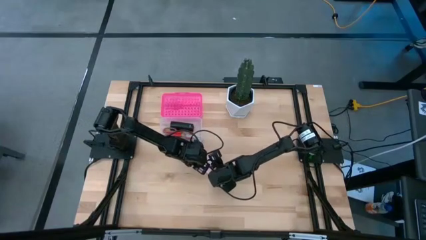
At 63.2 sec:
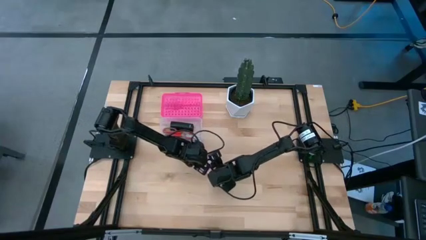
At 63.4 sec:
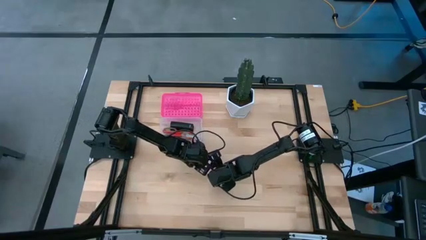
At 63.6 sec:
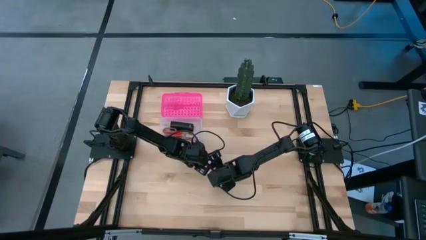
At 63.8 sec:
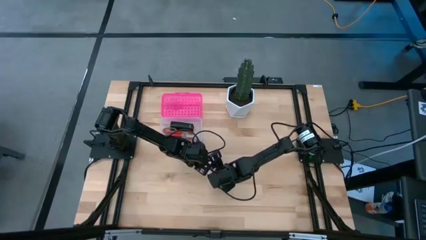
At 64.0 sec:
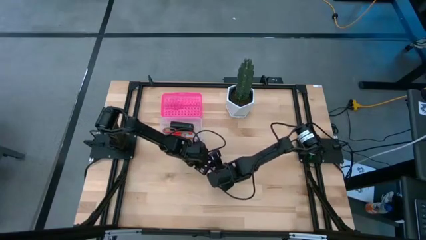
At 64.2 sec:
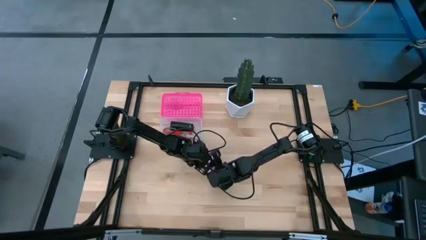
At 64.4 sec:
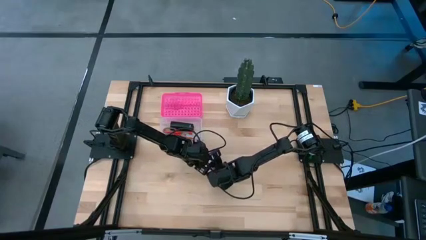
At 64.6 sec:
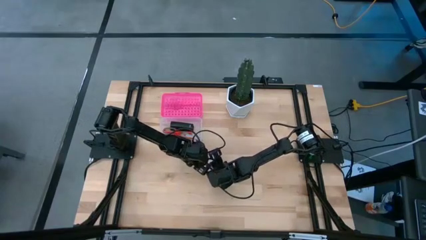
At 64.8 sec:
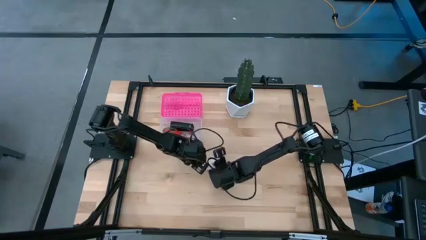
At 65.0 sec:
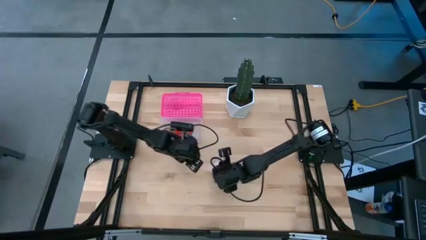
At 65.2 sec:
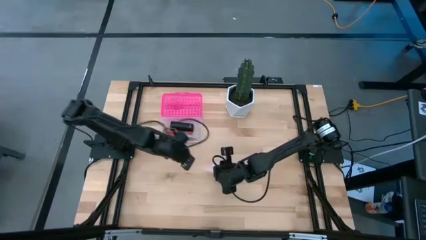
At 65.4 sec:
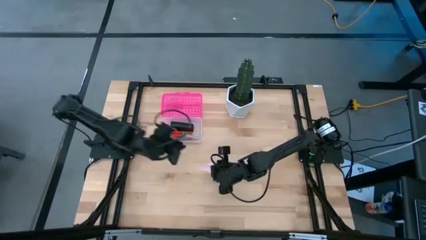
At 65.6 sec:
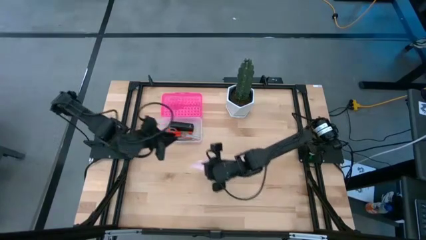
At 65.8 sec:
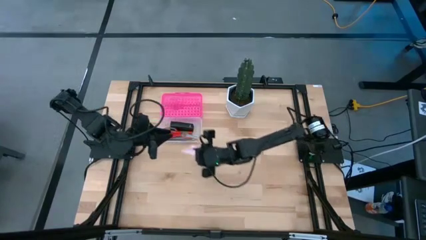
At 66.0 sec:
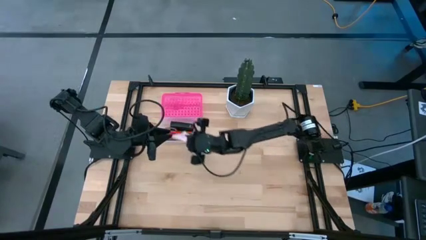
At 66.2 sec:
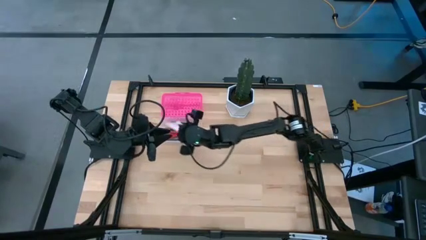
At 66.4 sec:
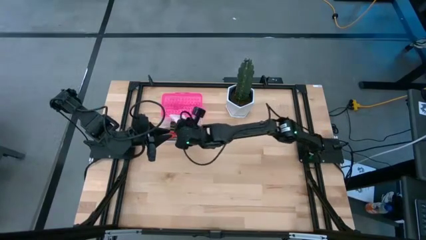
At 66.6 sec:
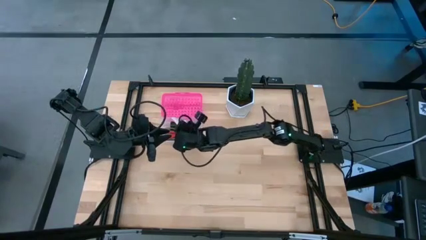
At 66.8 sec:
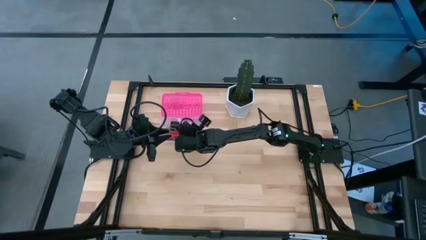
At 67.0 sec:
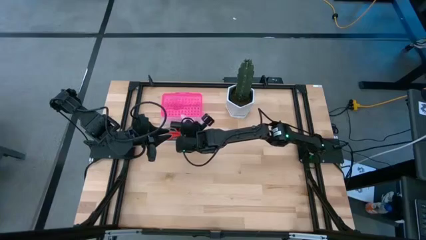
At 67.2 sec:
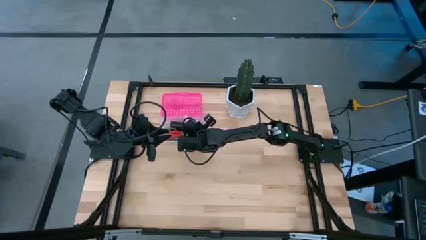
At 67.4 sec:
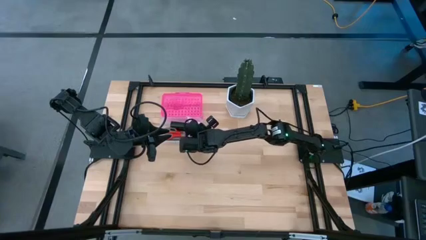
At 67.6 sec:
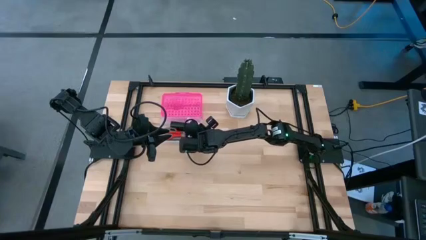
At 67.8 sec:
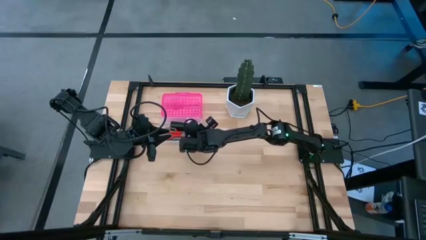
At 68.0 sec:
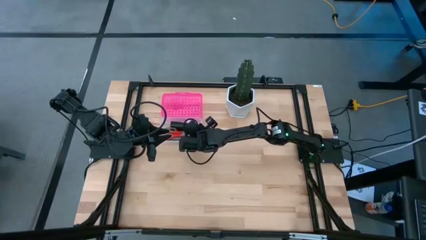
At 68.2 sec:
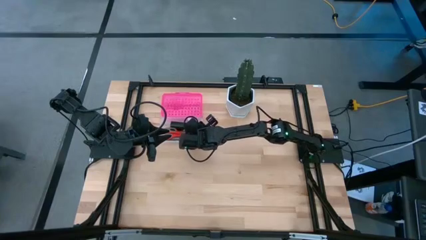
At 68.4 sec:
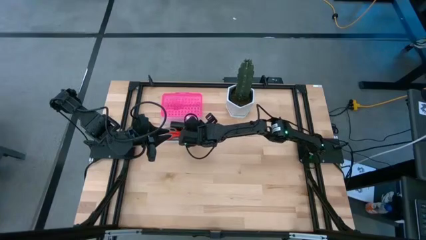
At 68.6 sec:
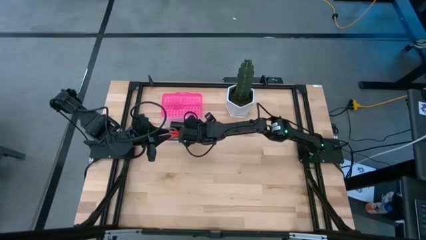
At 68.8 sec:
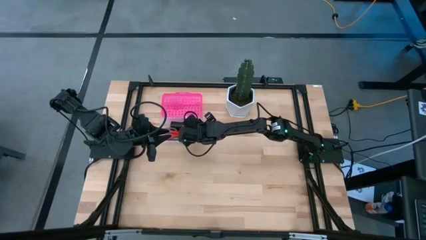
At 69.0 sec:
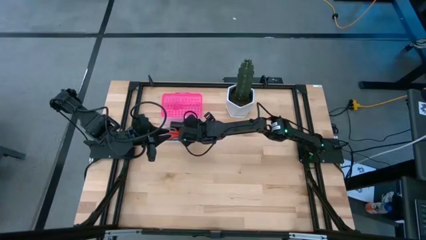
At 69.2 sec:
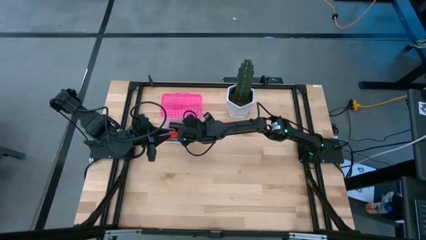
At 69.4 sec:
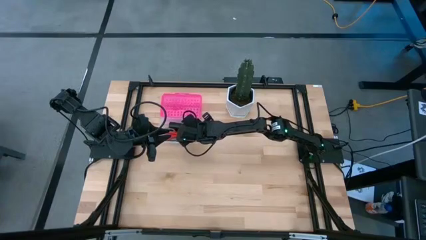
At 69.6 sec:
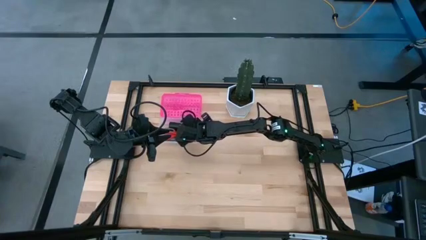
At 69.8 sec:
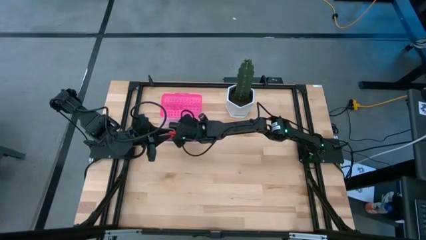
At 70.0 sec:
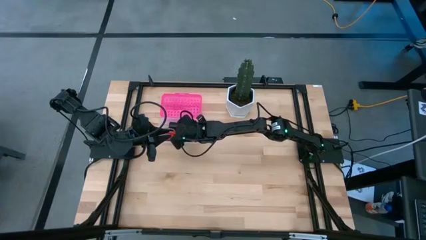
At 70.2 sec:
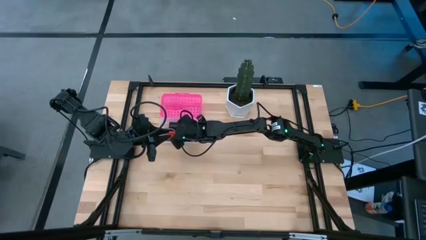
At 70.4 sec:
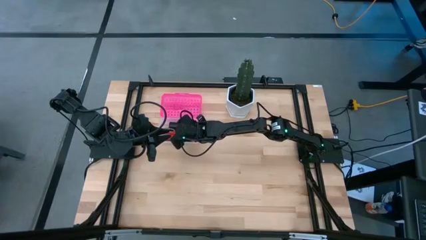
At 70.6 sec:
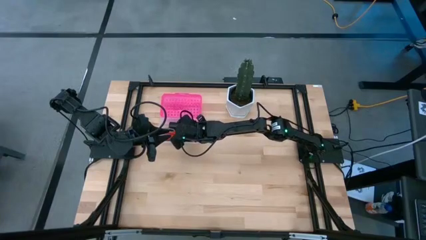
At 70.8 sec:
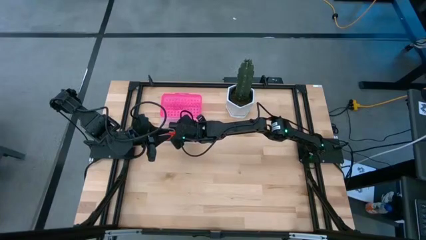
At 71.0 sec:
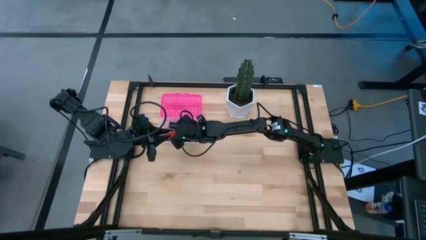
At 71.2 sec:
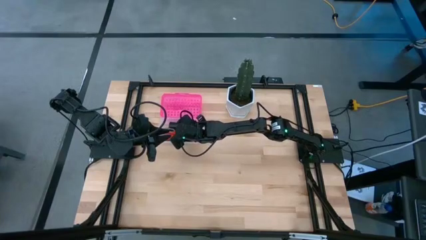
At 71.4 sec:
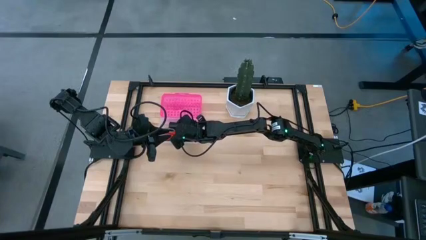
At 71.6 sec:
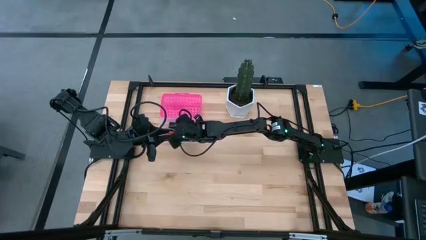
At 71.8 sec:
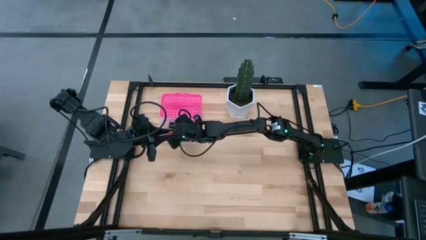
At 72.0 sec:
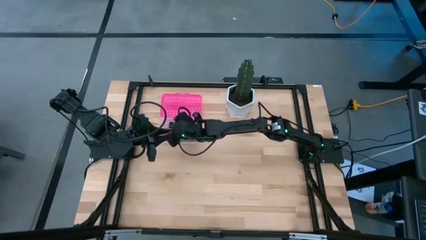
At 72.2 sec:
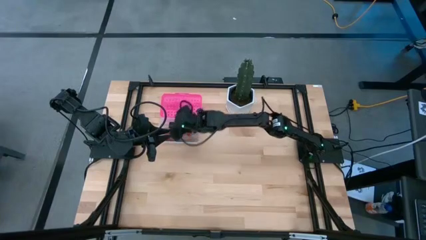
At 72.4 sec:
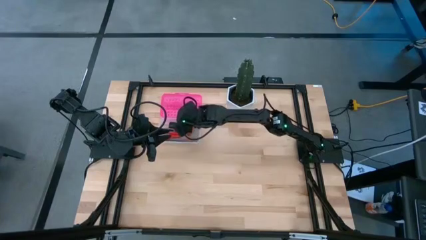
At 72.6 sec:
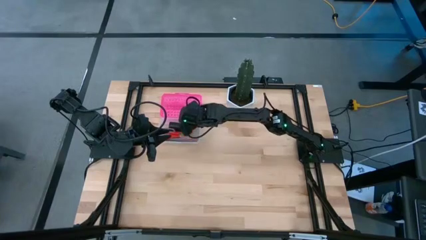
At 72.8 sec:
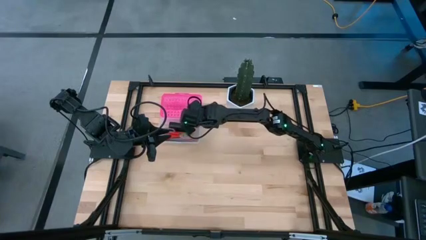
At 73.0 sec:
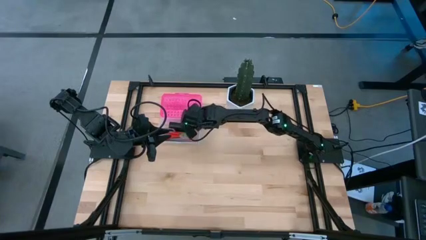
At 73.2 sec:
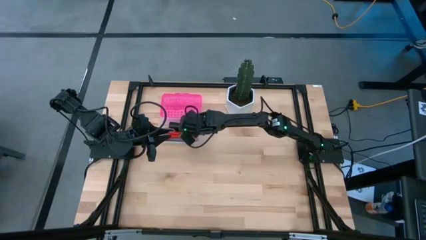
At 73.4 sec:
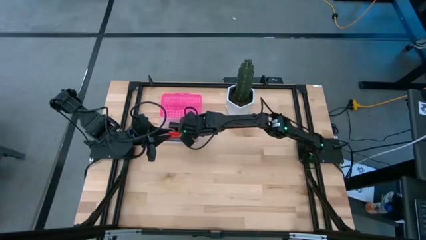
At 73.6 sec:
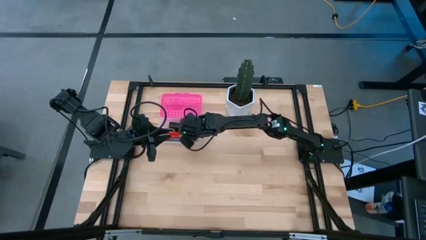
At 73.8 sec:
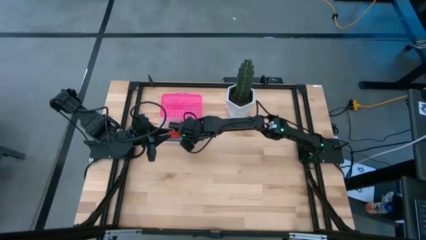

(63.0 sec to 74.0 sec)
Task: Pack school essentials
Put the pink sticky note into the supply box

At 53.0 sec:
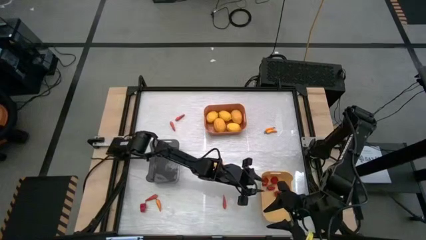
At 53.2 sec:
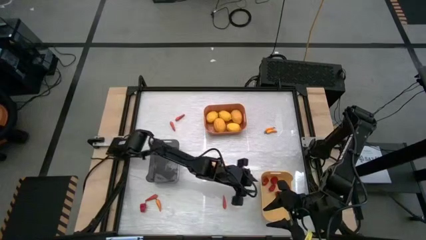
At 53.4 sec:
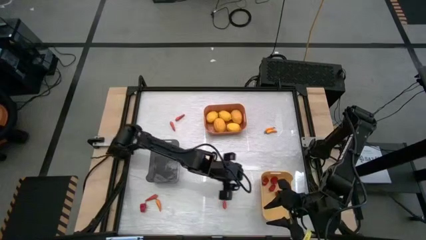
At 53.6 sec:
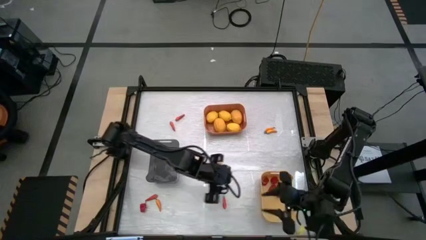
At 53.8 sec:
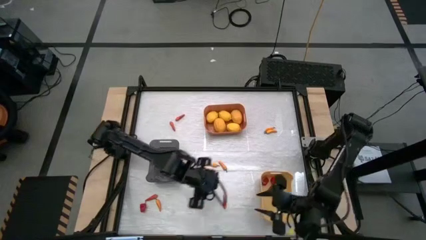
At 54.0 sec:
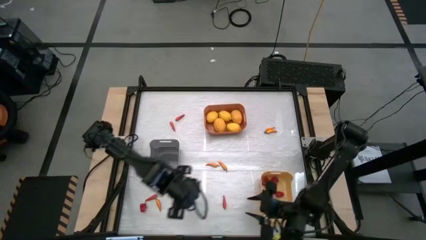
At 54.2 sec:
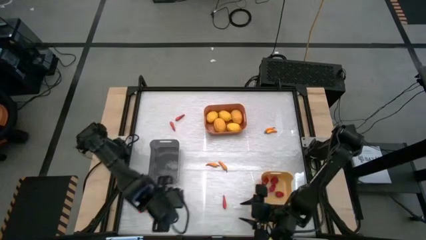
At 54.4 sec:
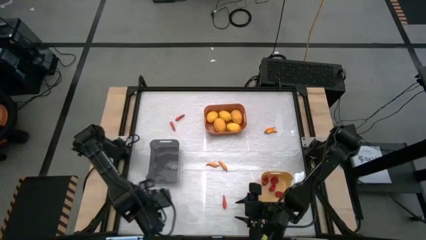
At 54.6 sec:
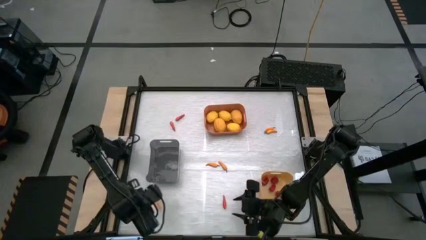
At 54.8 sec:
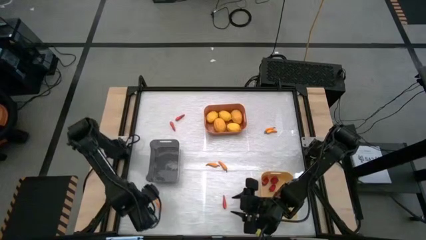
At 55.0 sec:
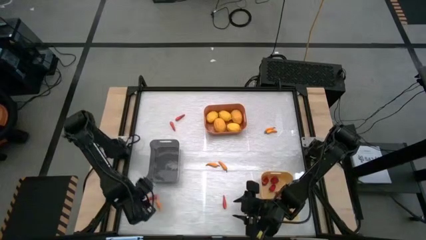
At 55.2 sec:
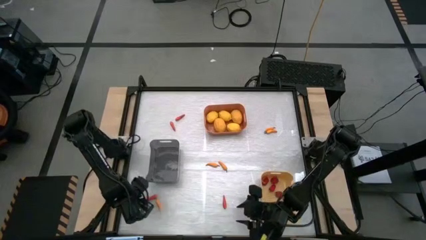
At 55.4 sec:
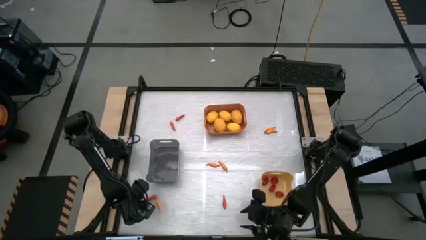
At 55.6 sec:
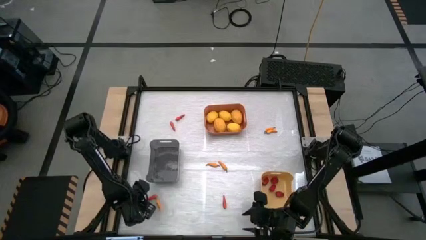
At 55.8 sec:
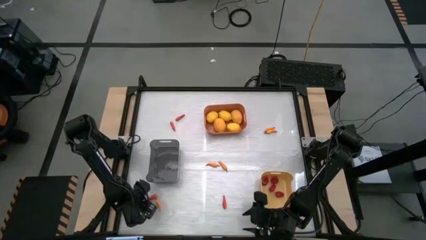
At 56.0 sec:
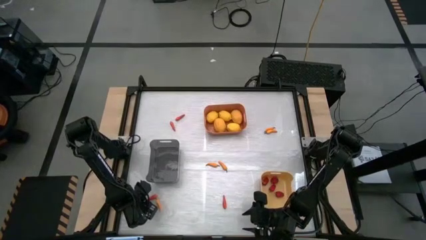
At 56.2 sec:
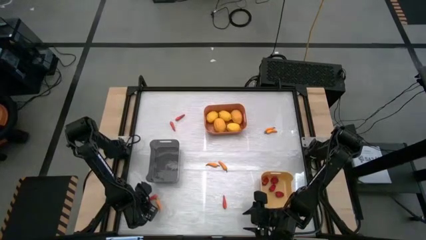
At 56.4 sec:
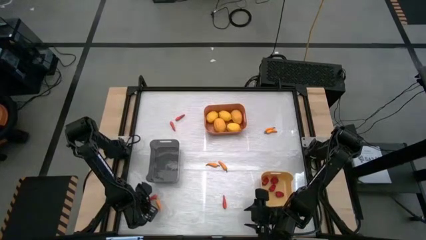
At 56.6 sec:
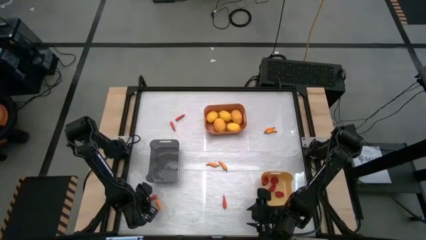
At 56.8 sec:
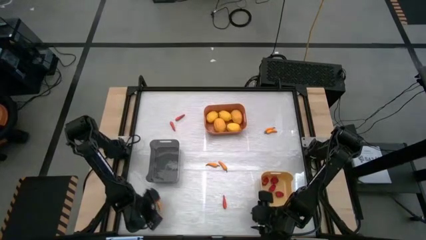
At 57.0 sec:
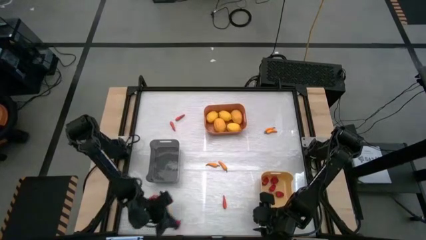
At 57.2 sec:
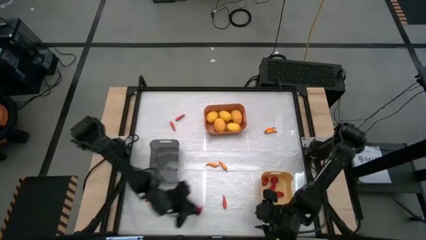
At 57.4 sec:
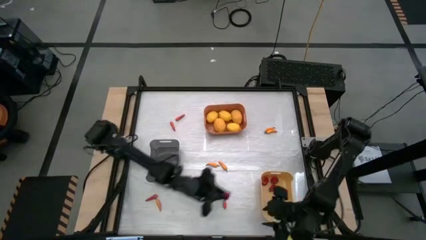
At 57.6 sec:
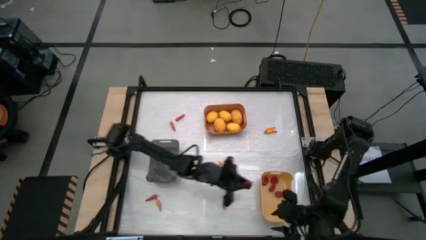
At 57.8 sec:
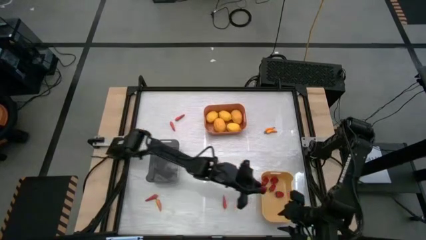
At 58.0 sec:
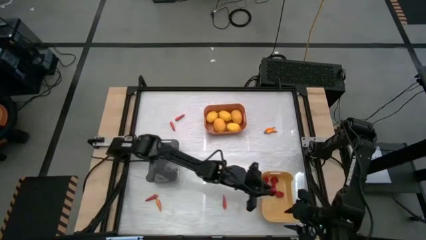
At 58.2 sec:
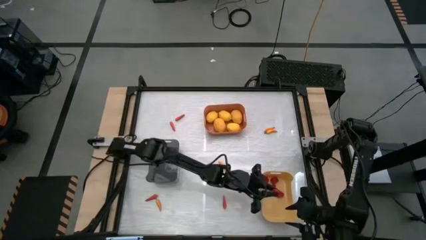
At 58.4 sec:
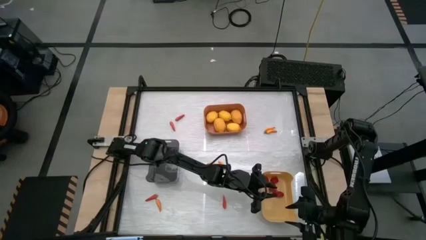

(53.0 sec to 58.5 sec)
Task: Sort produce into baskets
Put the red chili pepper into the yellow bin
